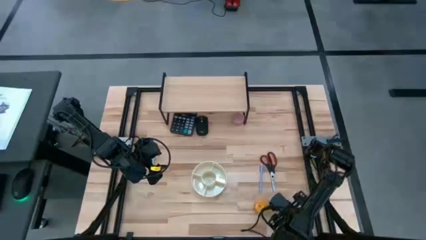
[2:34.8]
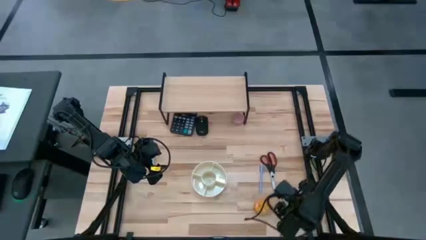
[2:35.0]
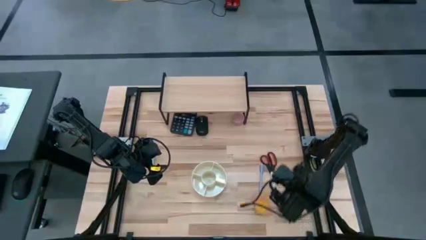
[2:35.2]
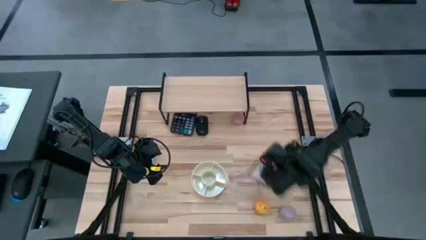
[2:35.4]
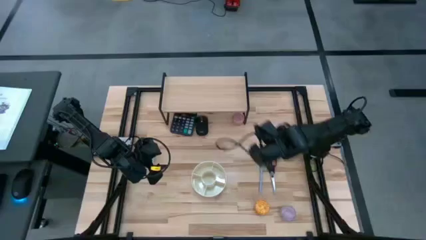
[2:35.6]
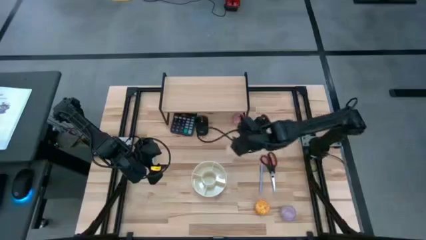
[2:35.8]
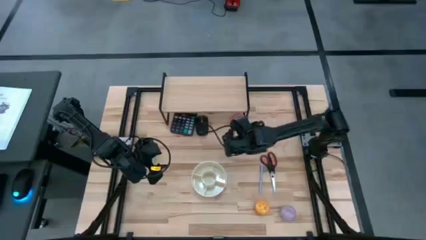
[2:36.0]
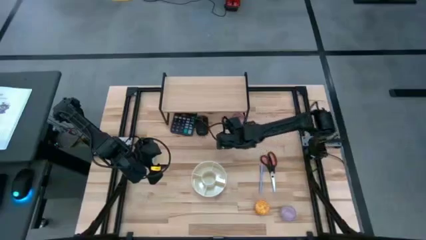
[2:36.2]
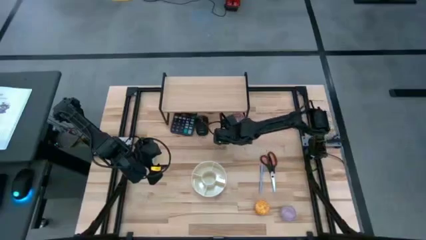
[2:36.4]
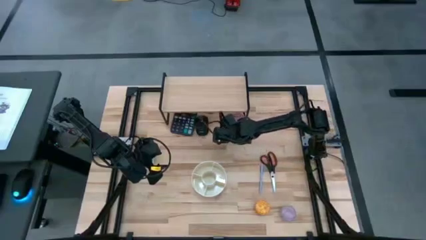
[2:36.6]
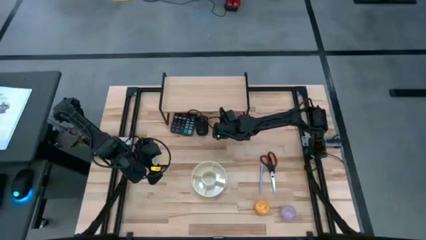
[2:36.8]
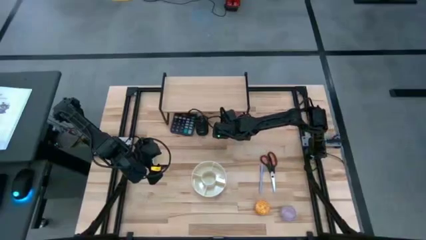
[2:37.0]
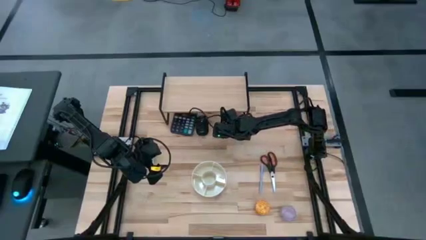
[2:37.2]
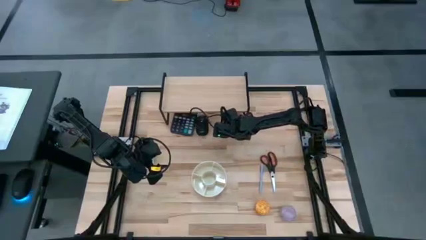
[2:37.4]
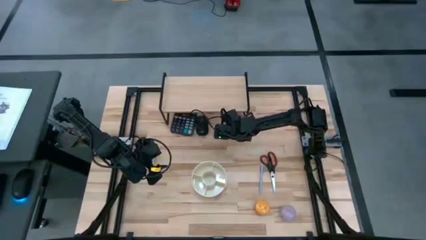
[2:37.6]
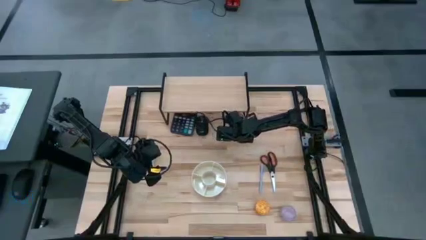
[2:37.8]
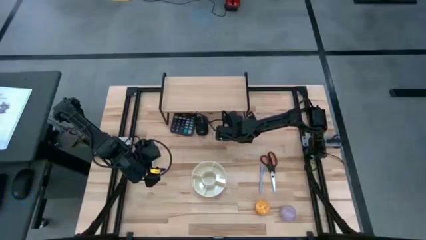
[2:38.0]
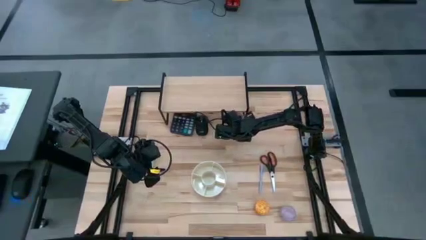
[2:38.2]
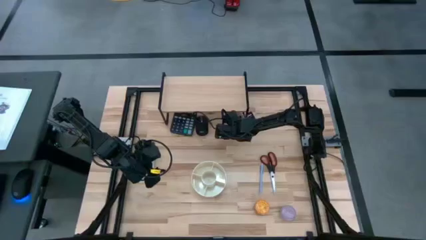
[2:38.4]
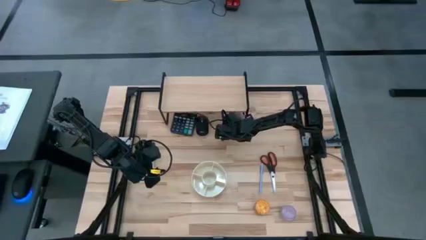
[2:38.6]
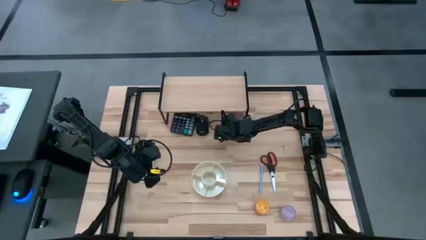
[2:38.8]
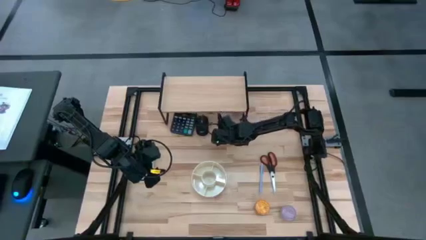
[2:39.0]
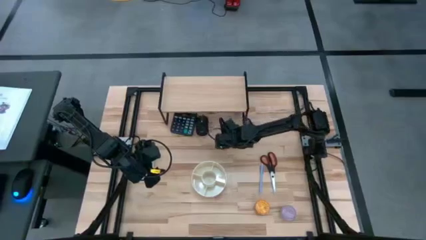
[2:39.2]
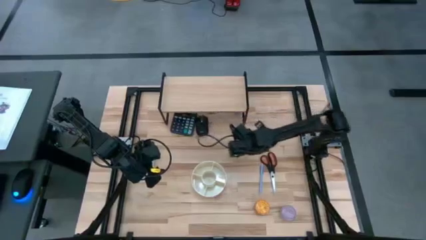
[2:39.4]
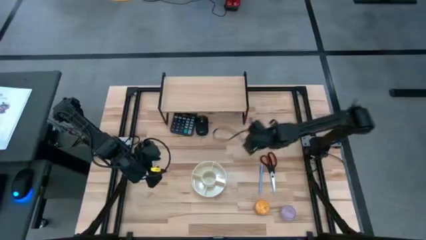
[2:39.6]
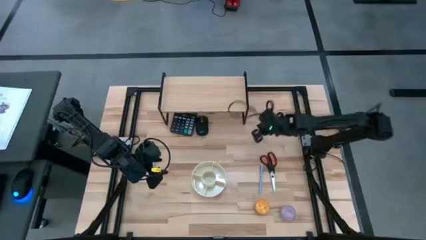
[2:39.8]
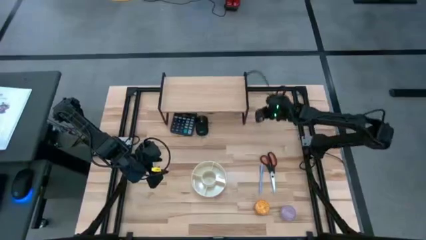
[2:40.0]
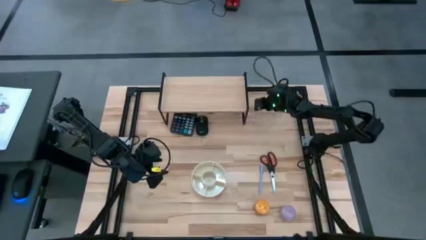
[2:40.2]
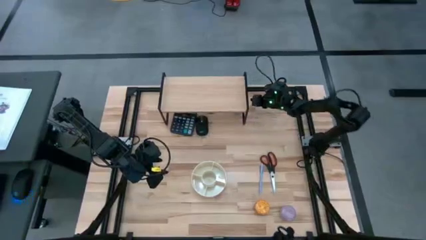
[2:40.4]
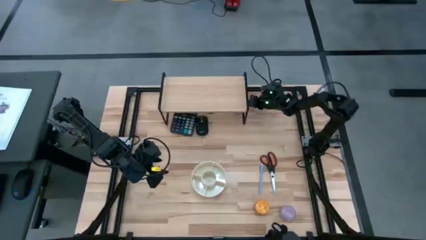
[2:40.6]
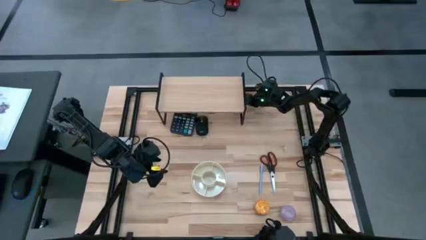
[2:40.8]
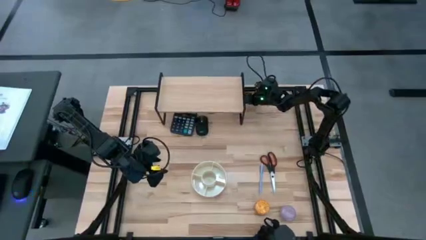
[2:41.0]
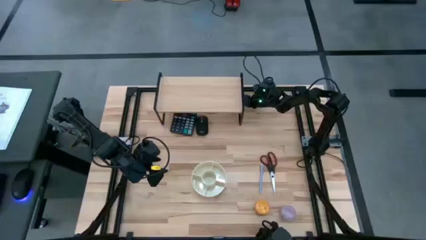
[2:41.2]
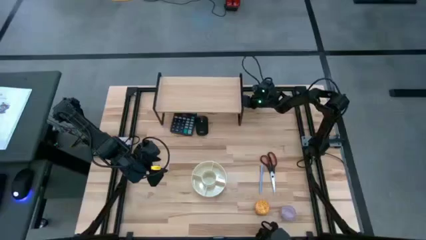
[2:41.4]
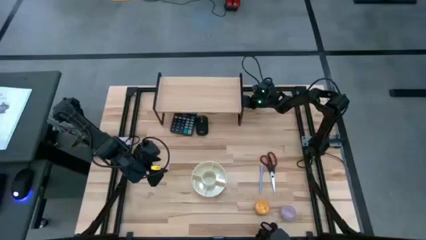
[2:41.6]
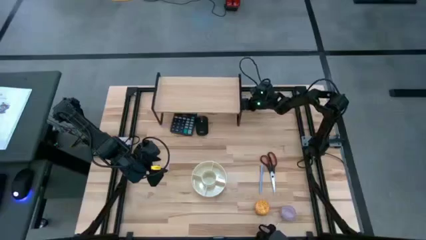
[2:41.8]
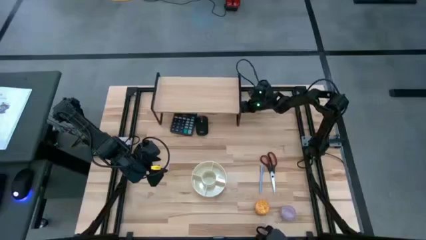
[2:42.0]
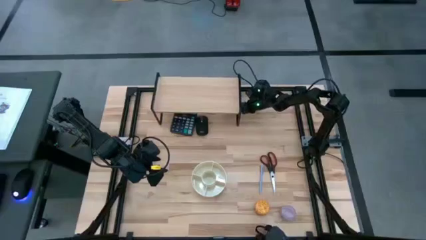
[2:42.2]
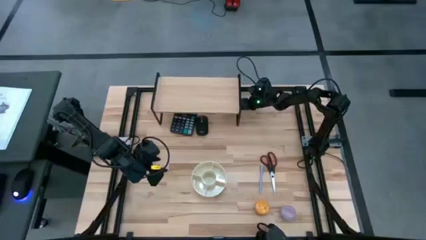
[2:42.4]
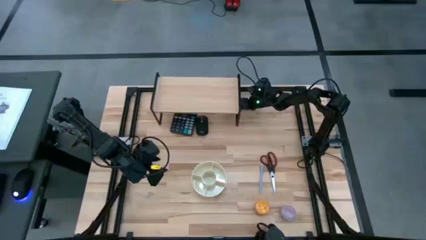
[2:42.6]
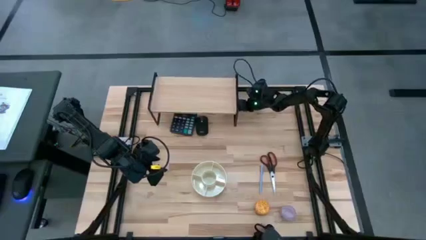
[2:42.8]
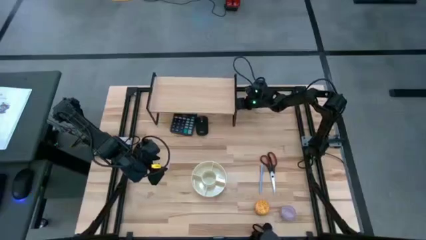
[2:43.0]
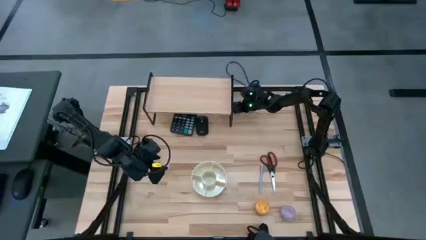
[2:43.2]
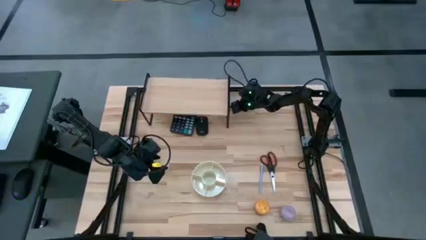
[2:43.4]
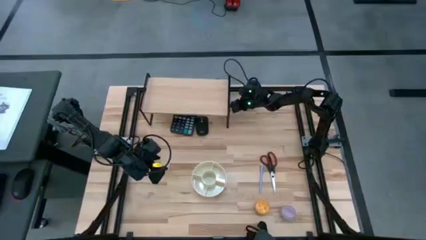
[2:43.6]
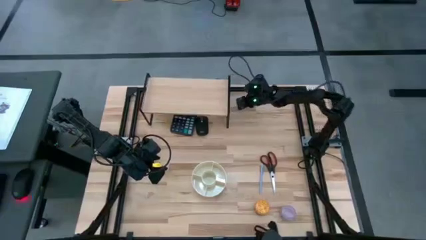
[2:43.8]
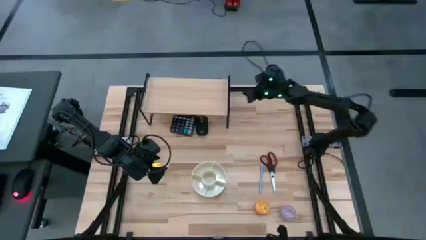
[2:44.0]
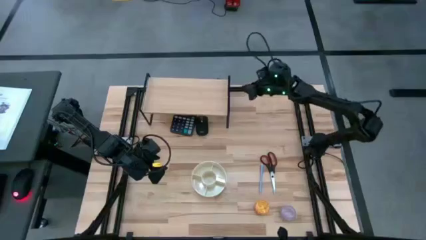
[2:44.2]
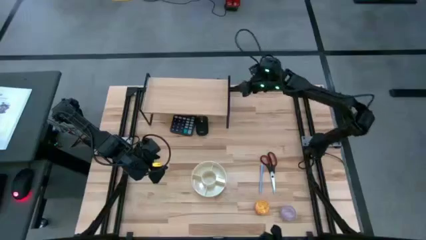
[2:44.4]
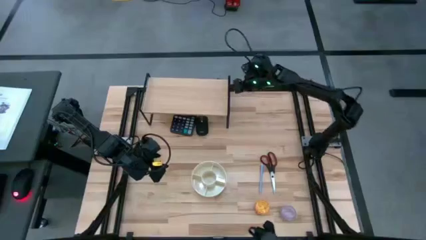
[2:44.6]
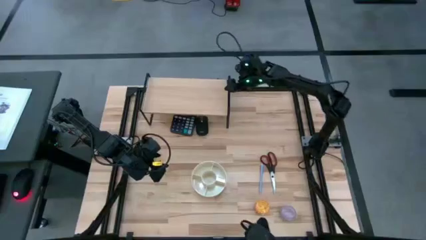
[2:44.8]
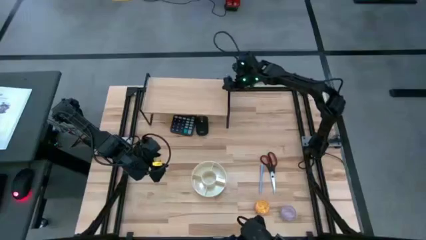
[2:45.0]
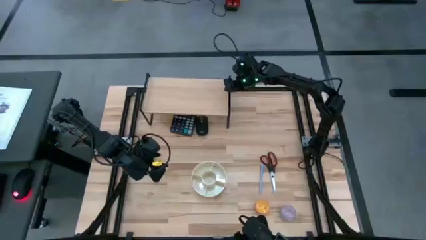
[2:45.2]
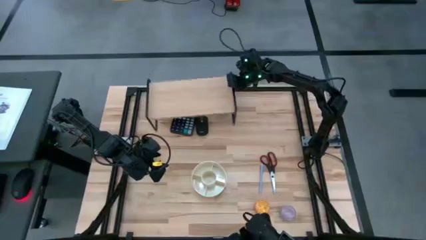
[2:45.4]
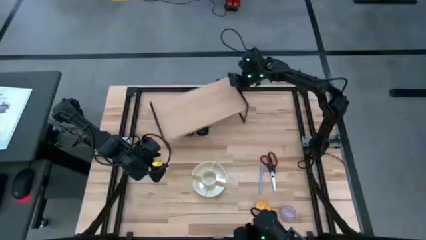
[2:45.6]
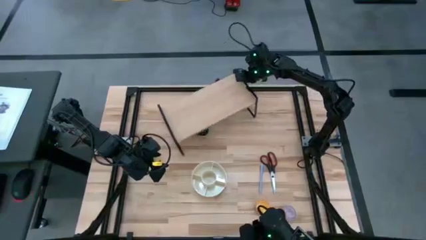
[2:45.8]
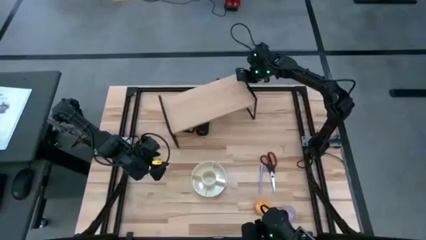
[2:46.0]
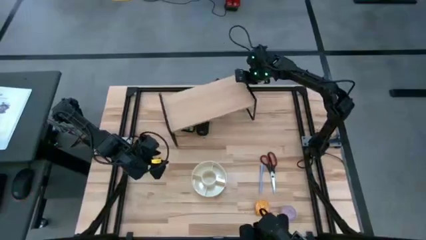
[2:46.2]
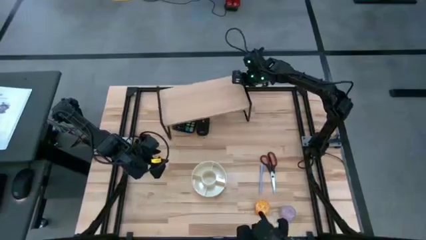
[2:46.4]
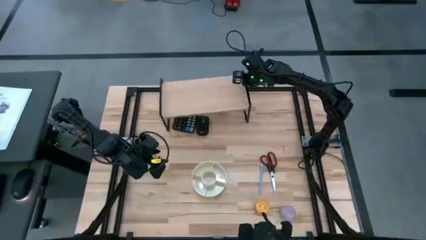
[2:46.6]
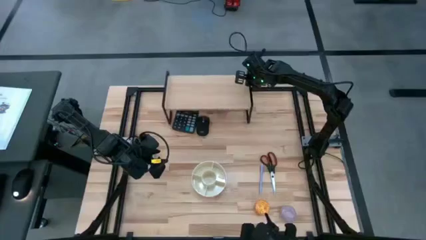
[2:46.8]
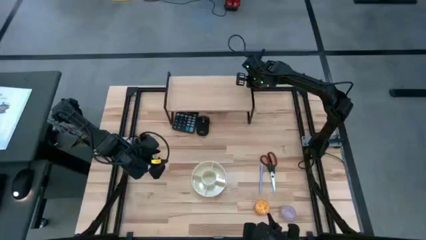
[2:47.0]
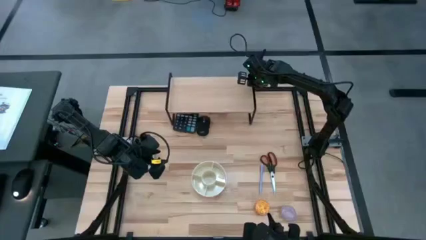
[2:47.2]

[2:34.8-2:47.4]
Task: Stock shelves
Adjust the shelf
